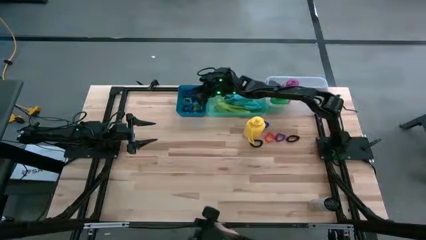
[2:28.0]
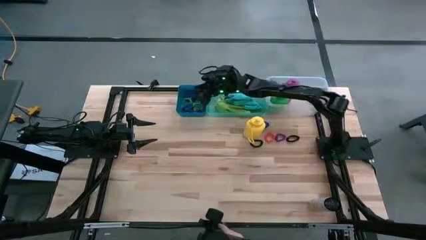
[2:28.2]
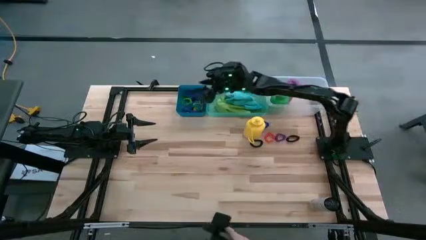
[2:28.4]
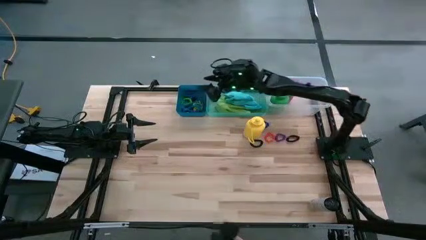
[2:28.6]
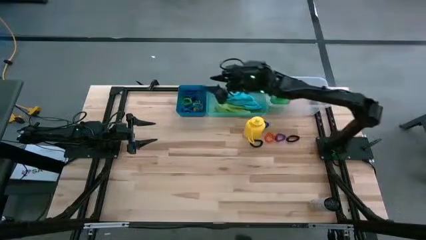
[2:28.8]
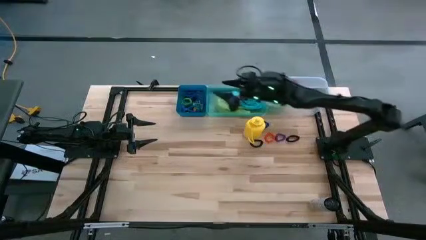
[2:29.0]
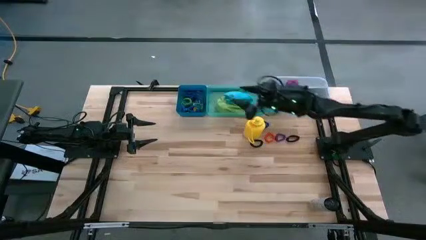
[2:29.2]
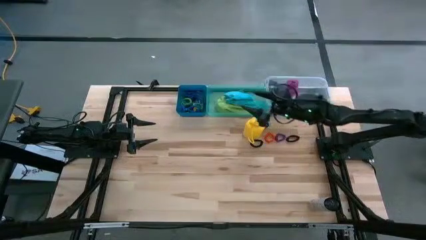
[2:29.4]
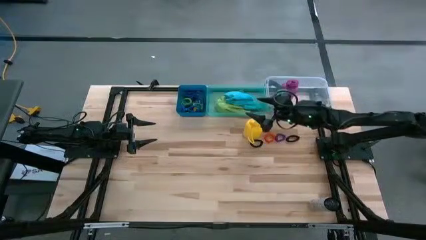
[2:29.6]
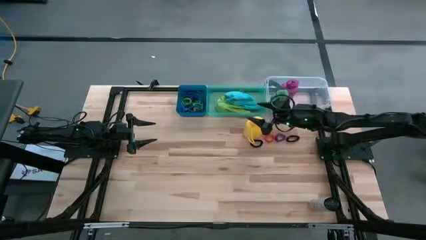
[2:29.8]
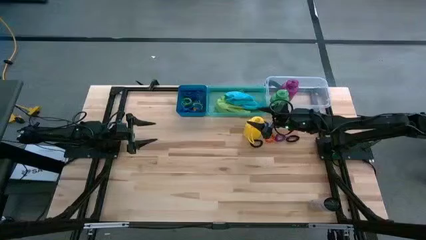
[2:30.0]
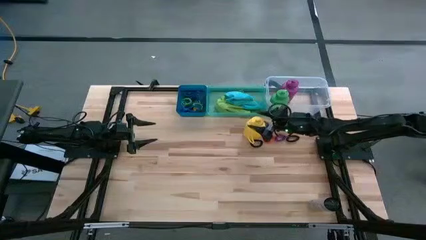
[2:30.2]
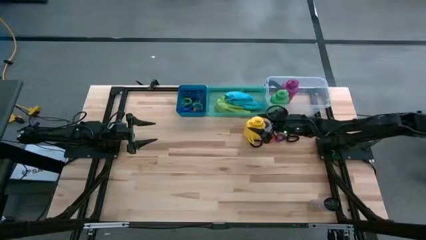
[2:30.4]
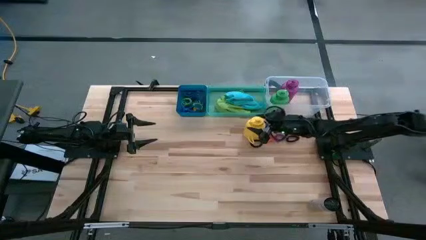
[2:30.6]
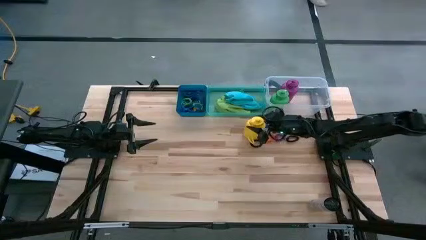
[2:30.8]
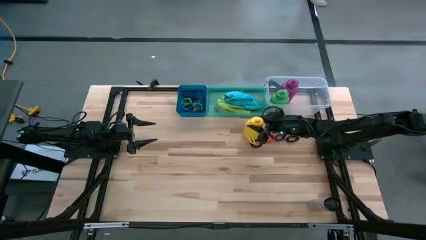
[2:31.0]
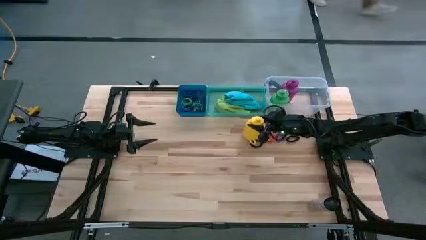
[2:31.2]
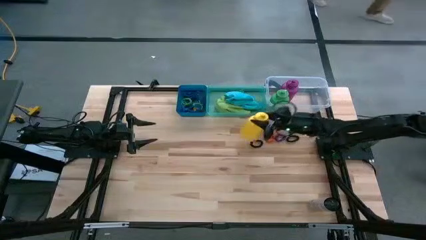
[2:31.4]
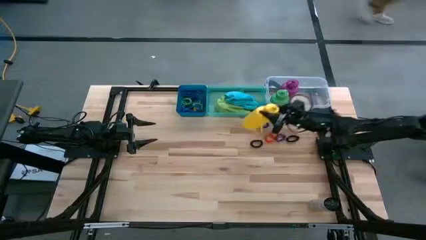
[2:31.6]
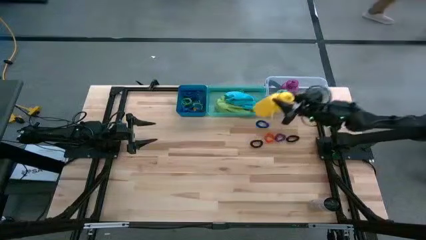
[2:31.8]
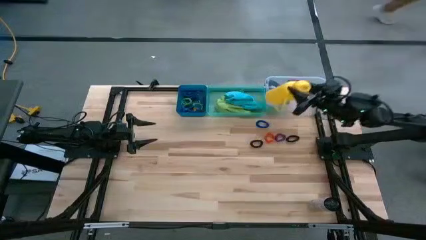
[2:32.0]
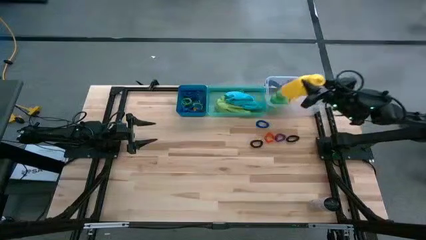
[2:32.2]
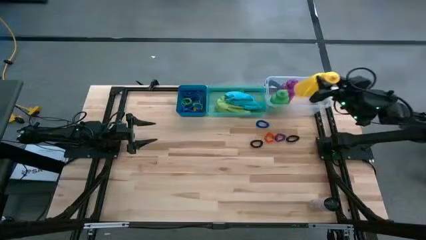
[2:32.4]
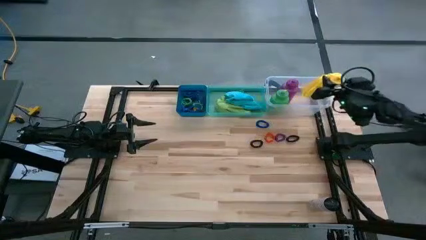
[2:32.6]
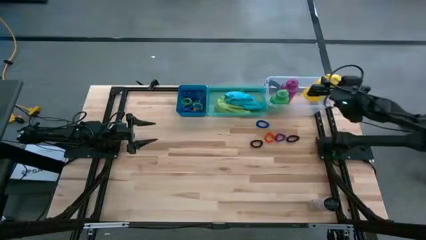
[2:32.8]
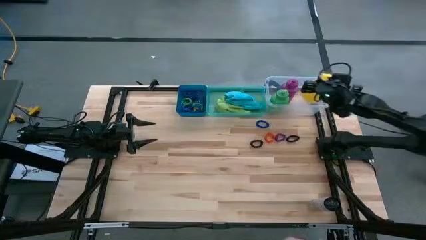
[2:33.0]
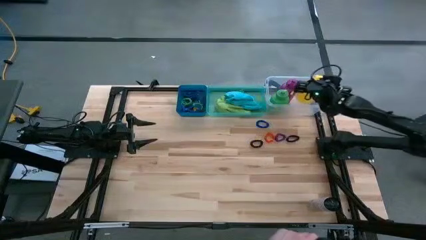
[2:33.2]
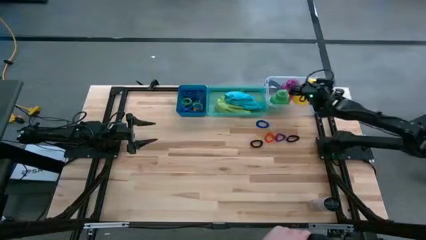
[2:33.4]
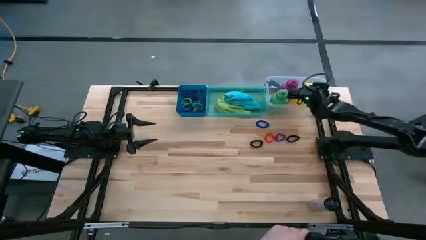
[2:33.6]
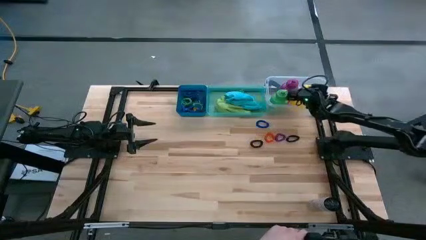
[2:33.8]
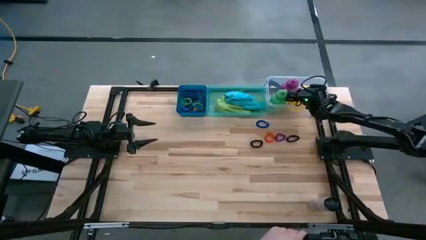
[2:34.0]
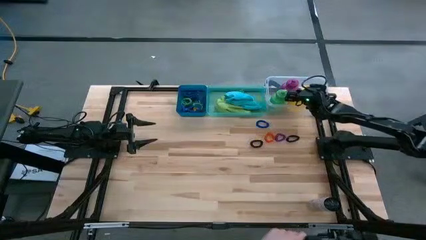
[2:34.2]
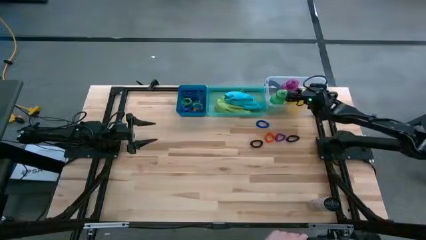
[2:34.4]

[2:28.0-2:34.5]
Task: Pick & Place Sports Items
Put the yellow tumbler into the transparent bin

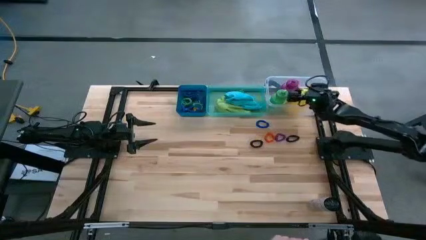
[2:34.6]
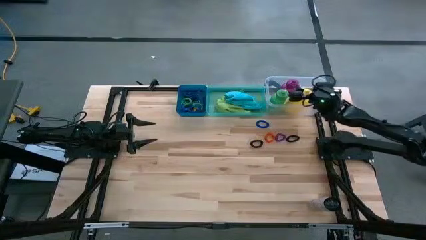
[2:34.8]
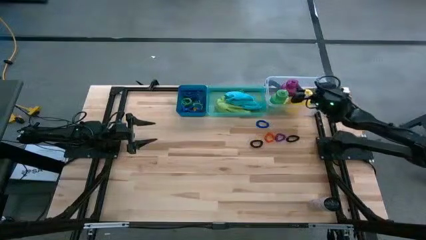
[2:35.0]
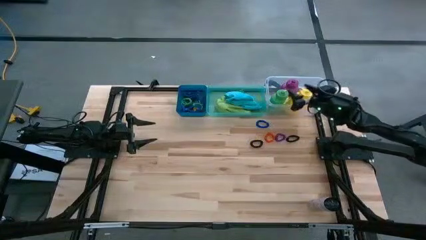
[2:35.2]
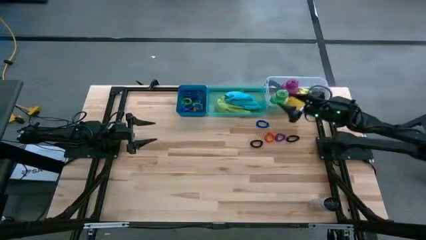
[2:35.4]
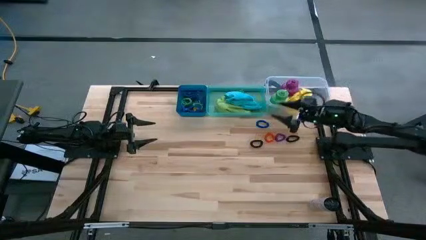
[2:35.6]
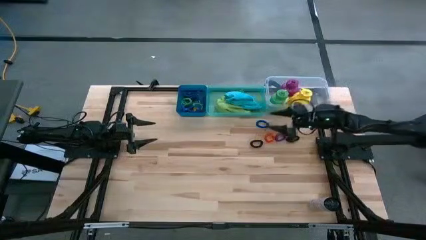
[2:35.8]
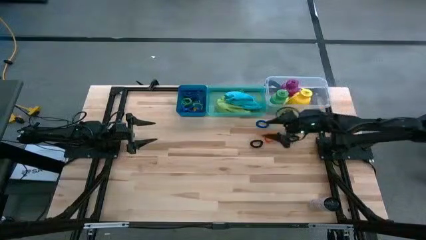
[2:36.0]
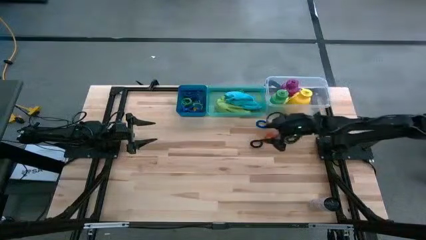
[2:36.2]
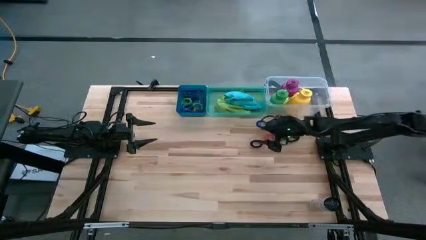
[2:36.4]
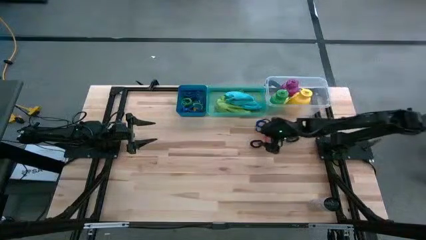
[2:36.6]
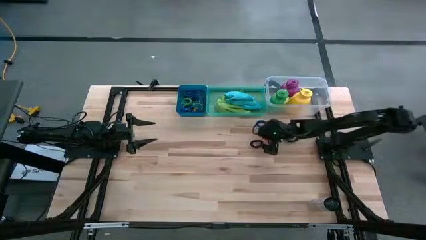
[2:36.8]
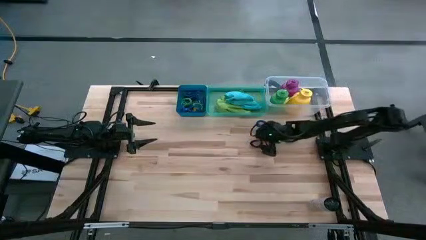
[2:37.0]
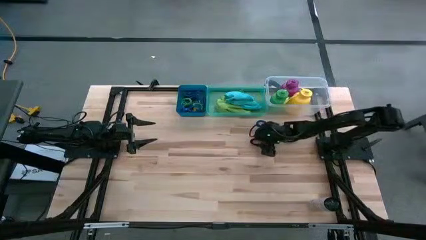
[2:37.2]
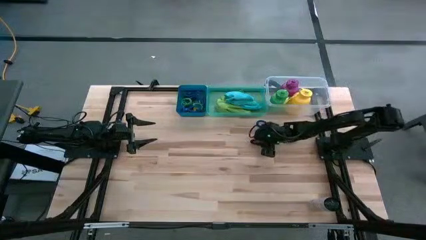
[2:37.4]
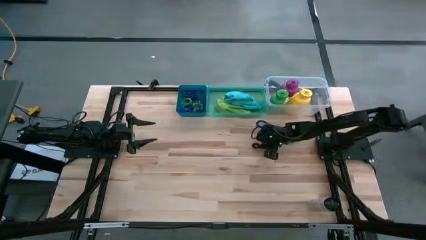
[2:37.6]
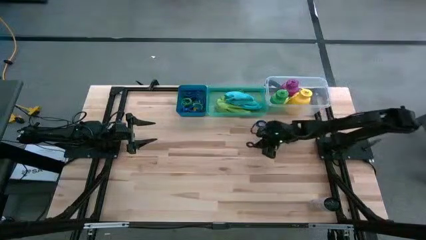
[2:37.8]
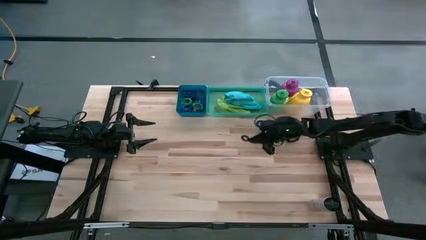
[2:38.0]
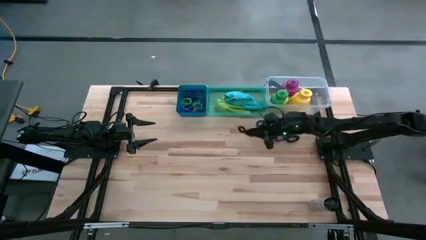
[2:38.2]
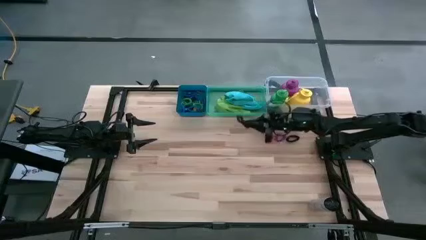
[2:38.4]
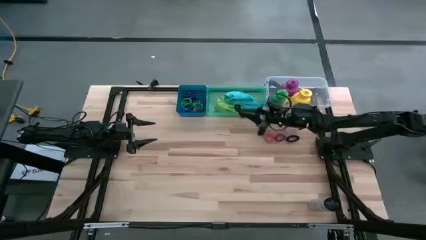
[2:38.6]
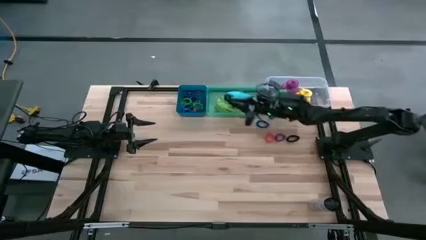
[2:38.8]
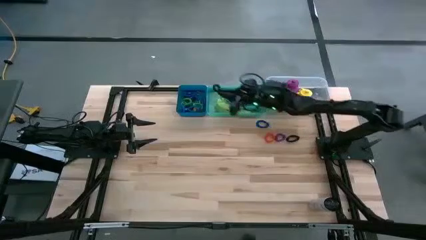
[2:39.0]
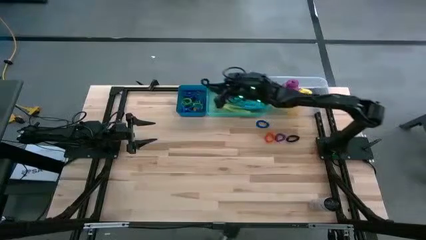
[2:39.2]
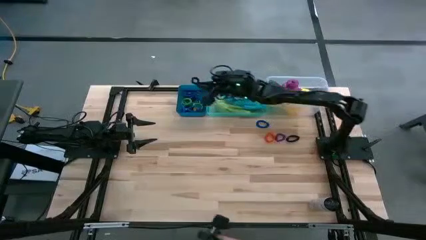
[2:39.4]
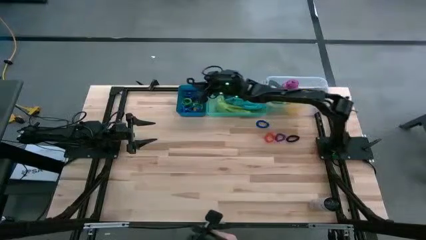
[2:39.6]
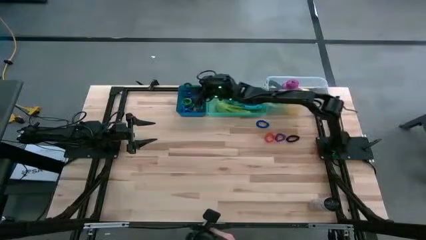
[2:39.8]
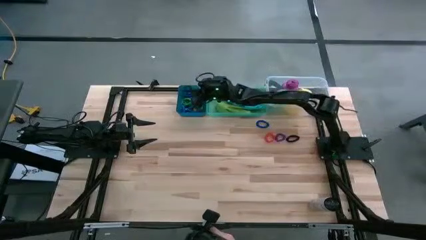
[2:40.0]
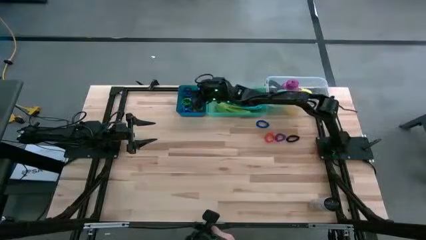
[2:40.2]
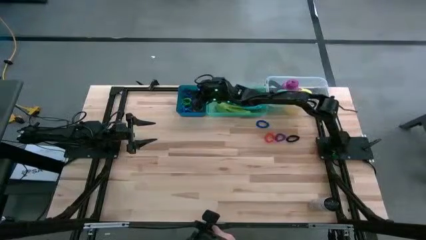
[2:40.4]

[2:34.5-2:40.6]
Put the left black spring keychain into the blue bin

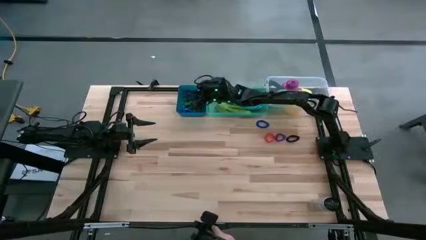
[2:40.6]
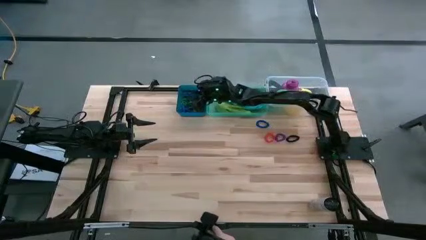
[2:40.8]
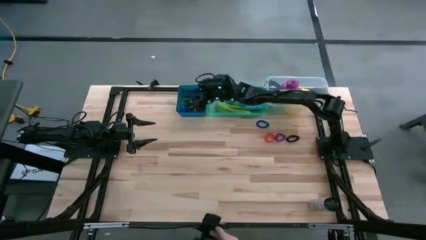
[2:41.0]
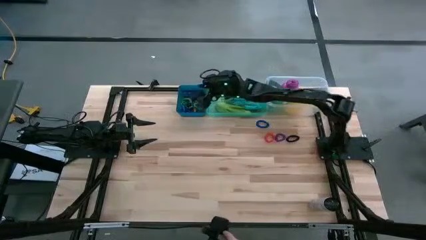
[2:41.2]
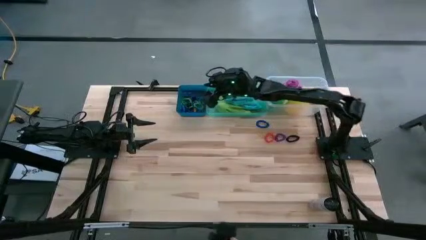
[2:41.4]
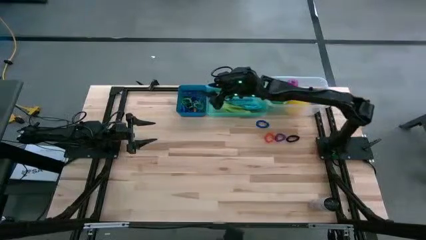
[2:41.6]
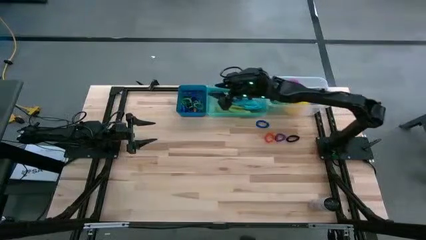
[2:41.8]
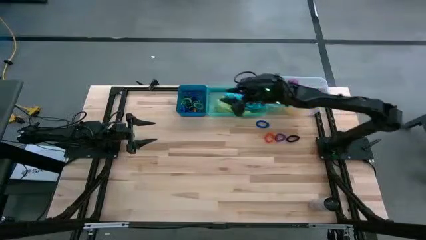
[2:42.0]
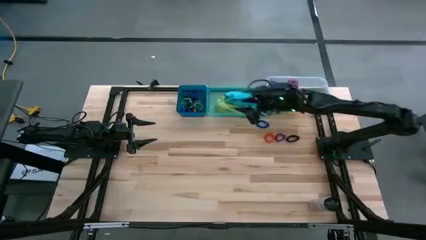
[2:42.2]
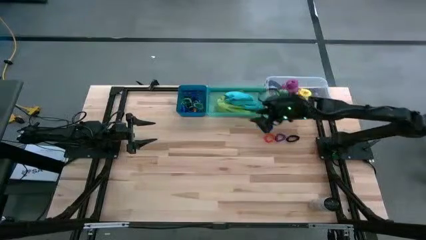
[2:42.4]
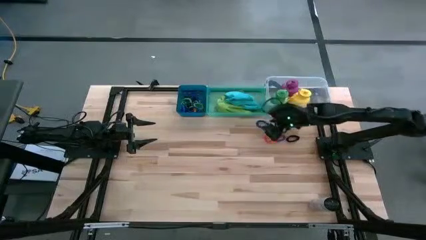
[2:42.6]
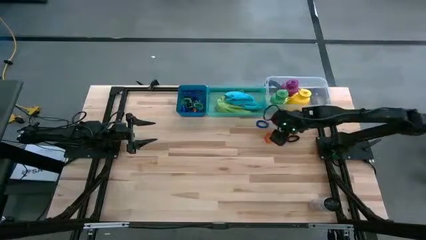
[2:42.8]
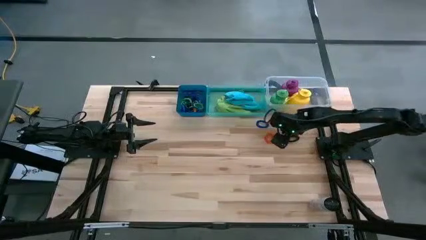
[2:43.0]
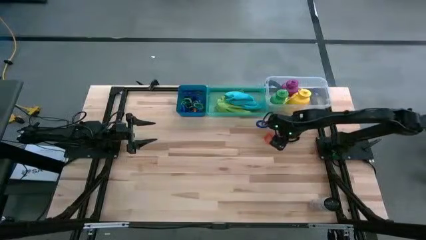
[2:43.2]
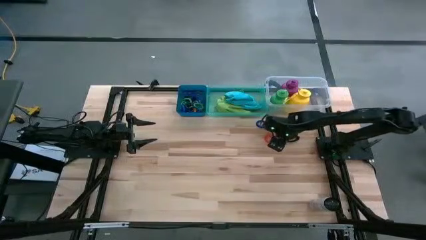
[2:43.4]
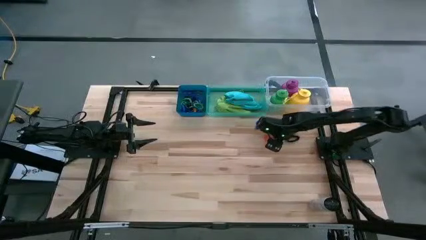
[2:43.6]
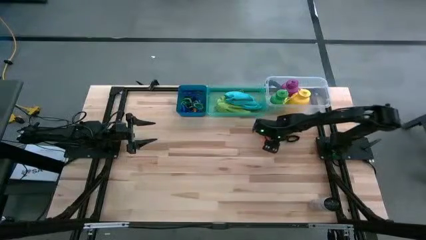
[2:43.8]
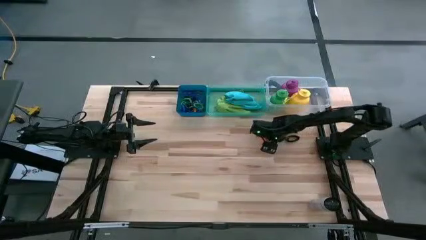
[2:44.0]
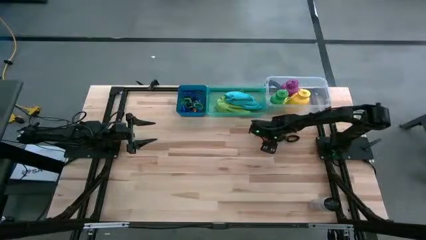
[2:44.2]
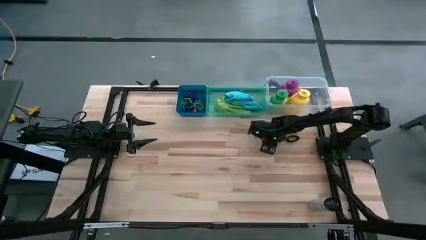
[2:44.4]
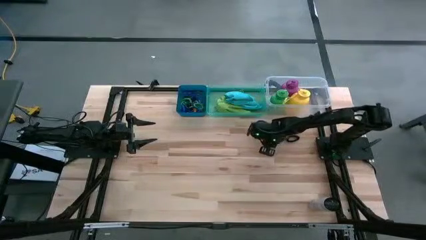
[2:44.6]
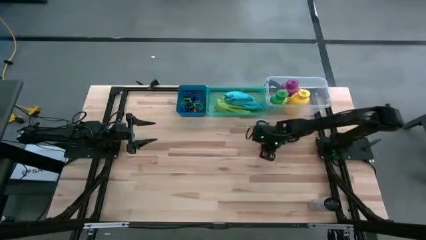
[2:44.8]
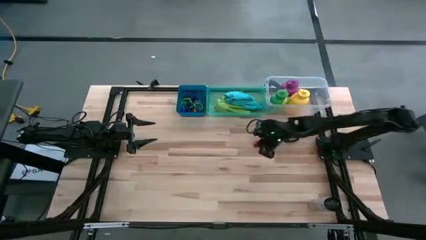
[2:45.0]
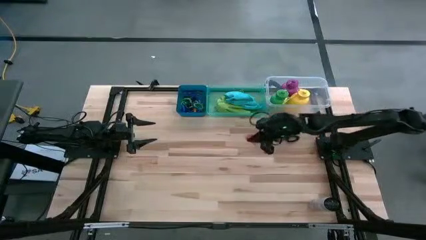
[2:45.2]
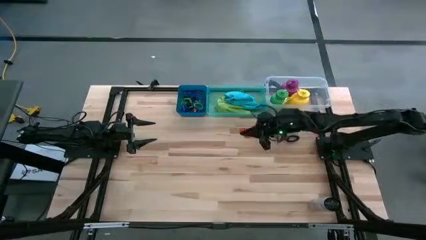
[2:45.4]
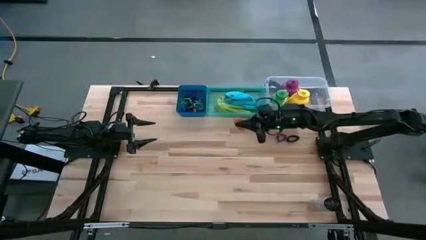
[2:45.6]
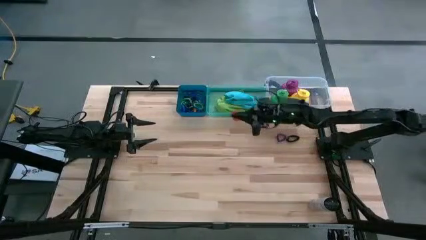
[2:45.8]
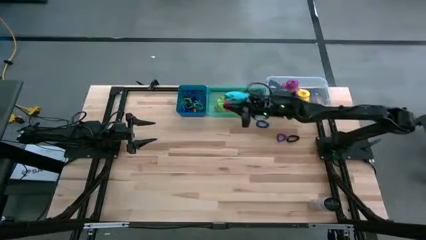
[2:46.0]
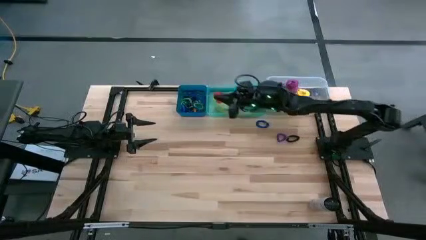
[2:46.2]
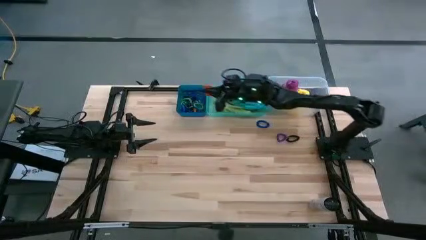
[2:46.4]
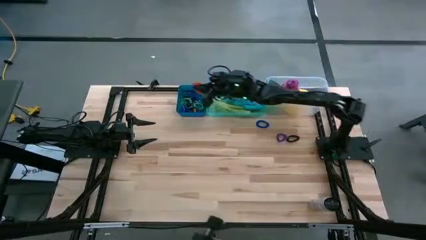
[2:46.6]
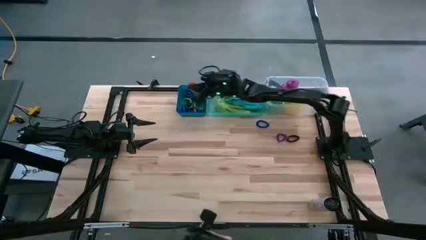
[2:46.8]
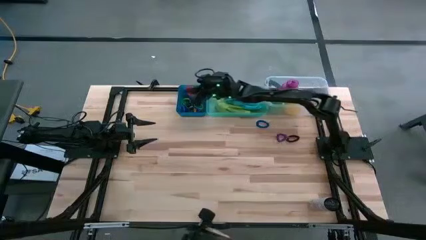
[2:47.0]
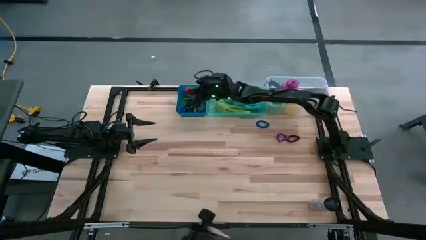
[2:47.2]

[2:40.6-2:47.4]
Put the red spring keychain into the blue bin
